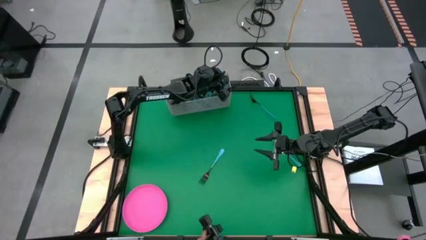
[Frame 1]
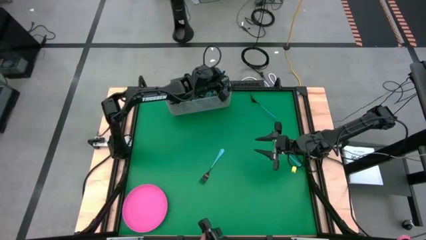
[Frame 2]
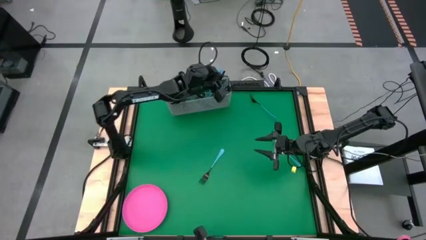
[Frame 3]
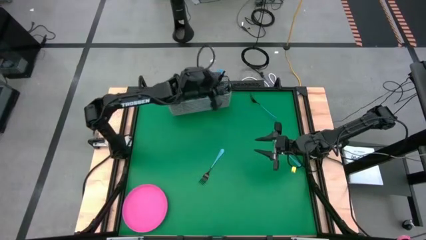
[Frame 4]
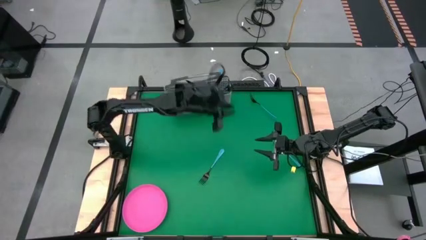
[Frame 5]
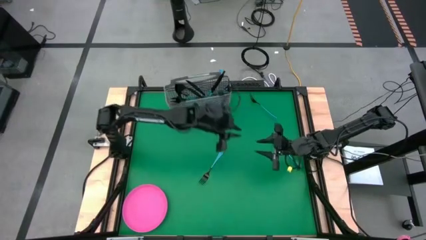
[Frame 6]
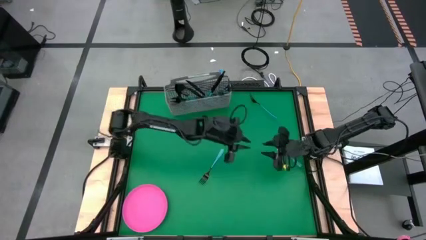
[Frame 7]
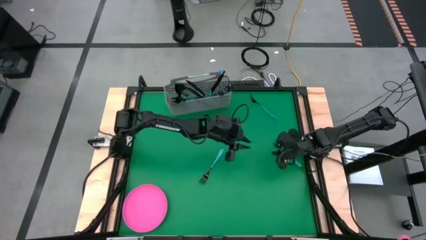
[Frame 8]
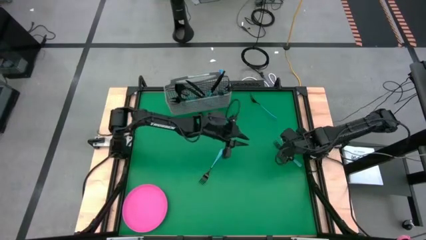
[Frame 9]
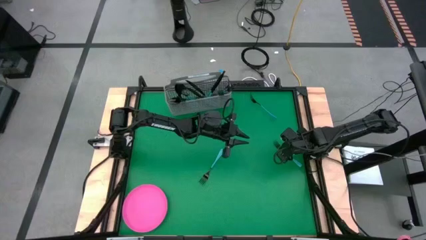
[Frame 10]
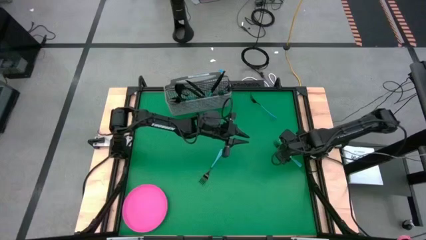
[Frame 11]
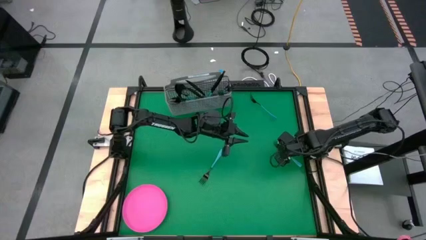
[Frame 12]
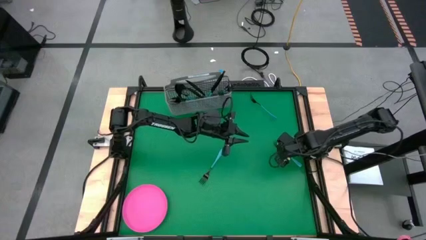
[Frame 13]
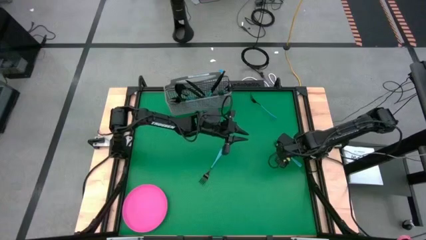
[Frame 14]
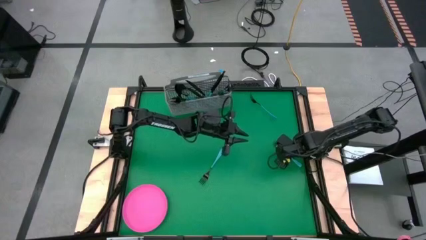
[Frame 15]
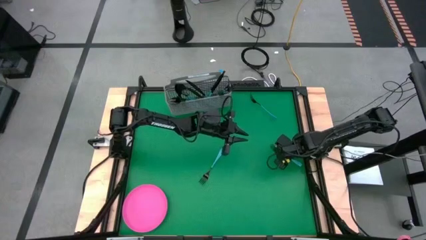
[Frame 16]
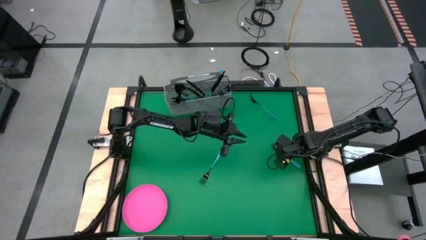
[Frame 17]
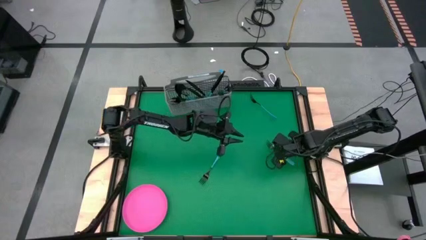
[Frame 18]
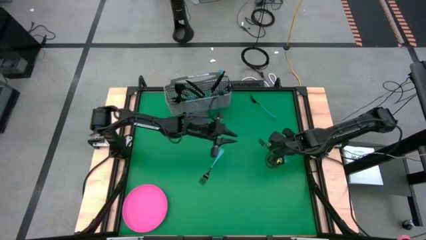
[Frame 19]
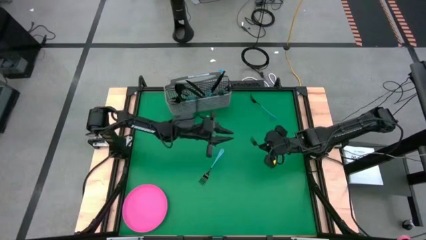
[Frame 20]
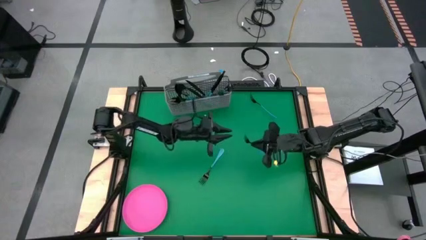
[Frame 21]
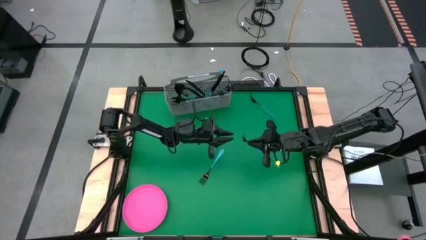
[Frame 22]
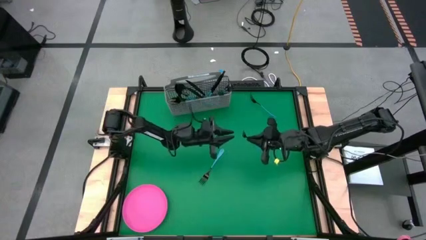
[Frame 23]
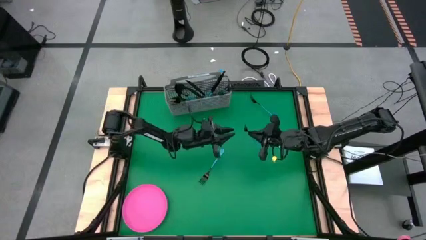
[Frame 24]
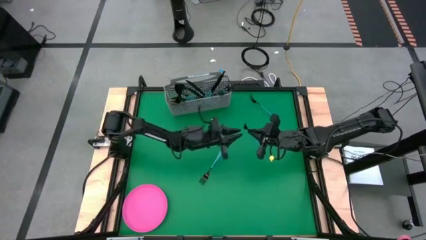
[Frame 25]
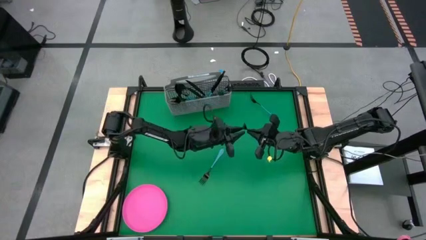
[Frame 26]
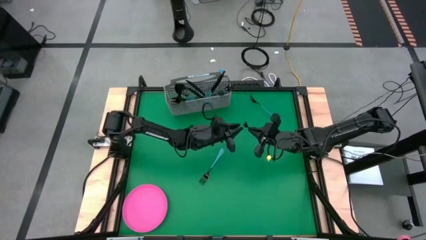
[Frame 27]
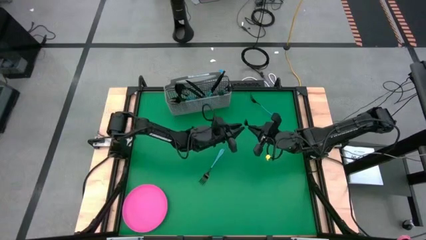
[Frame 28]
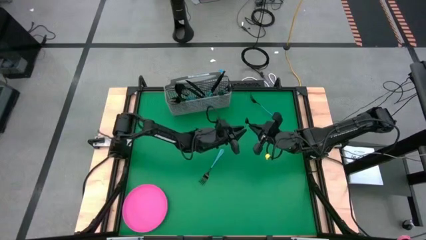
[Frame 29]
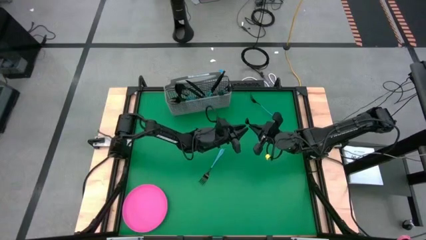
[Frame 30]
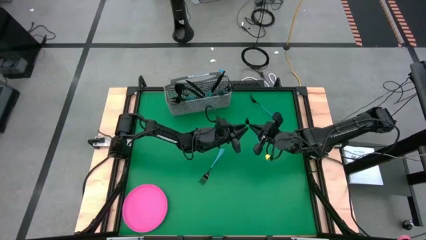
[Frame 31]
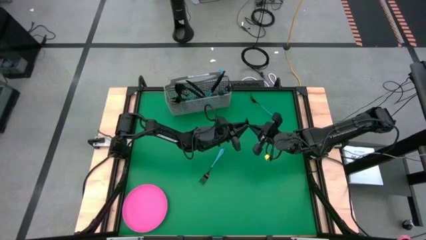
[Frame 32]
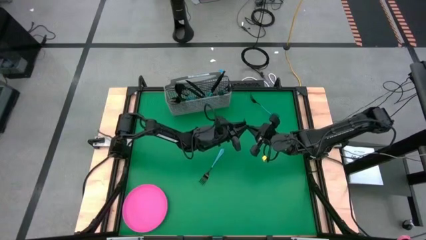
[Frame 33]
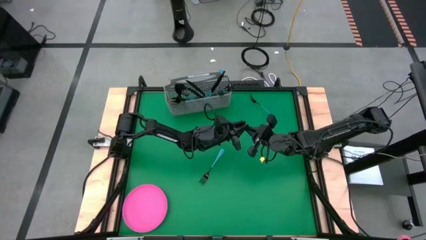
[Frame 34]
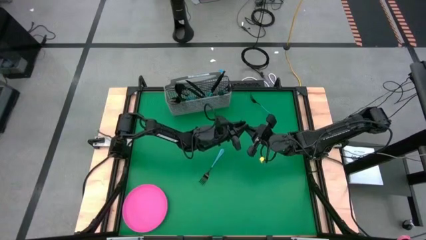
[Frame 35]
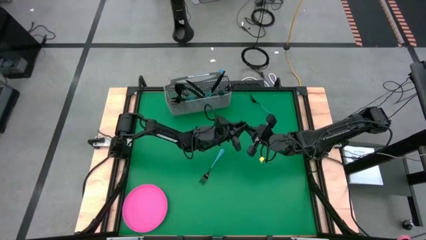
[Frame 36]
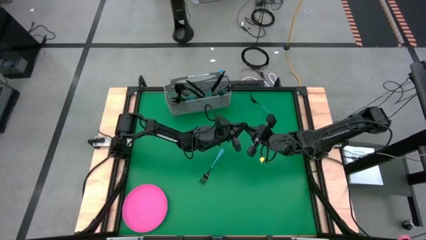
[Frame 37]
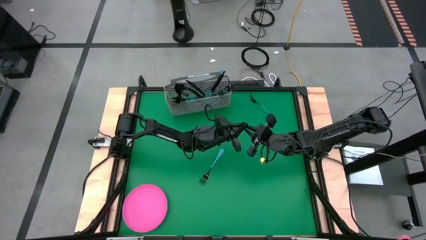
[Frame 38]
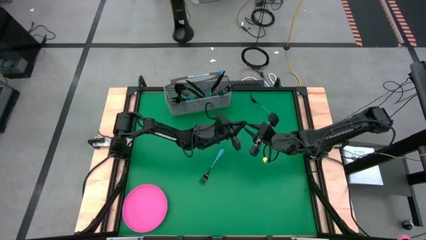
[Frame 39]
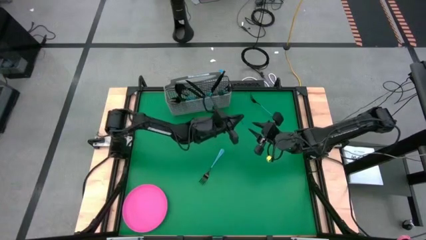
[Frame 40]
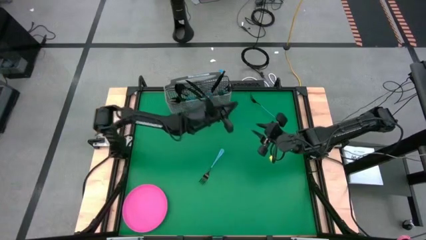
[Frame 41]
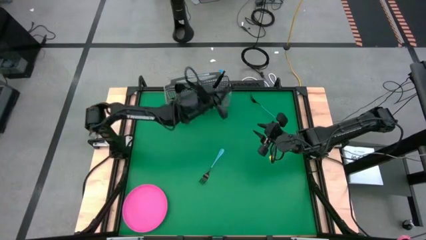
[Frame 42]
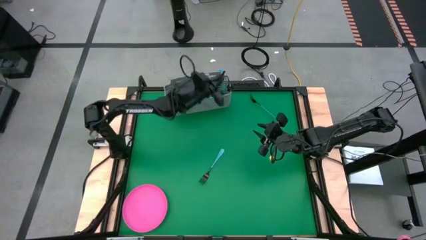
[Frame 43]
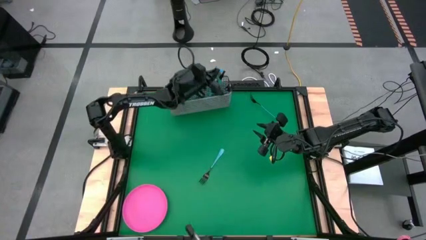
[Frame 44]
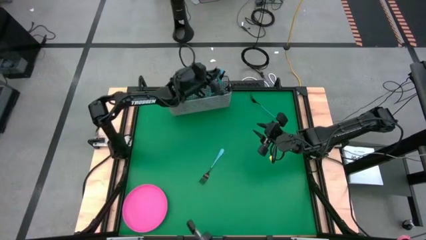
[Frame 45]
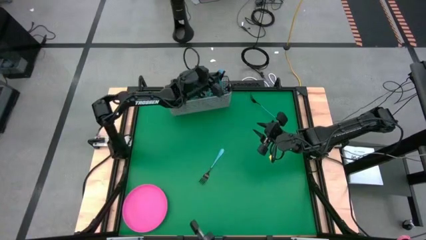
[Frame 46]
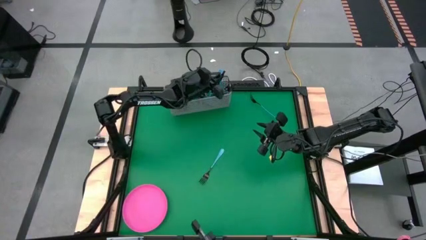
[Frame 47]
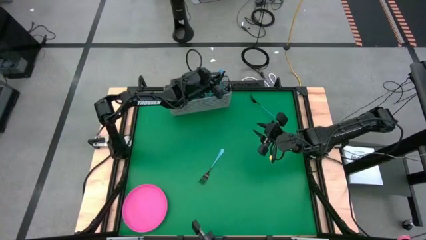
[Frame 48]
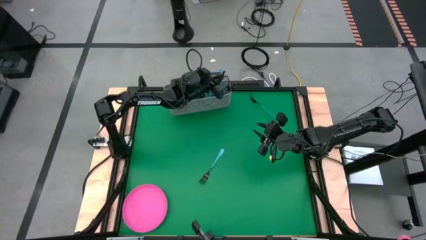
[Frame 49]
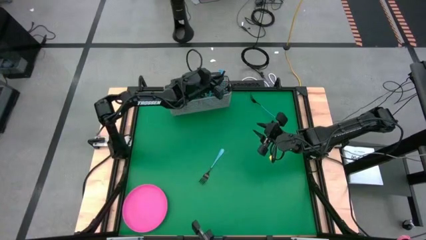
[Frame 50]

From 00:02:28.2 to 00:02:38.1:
Task: Sort silverware
Put the blue fork into the silverware basket

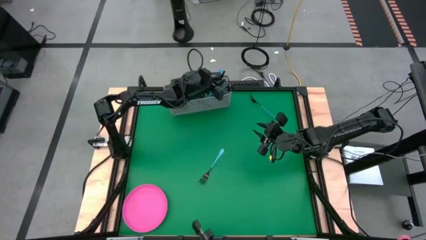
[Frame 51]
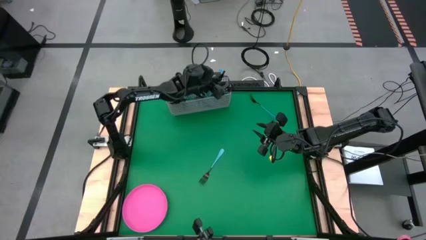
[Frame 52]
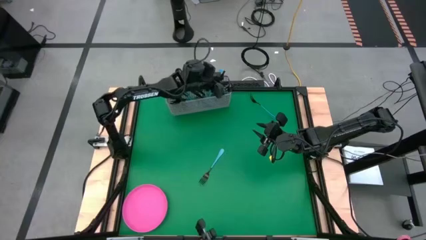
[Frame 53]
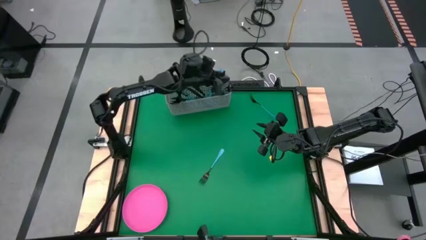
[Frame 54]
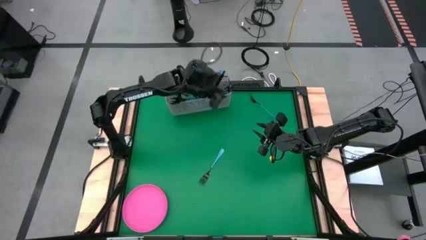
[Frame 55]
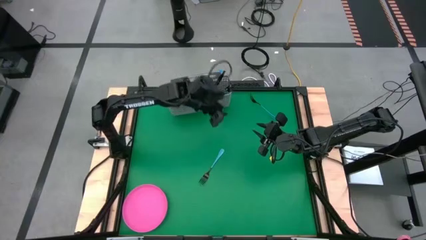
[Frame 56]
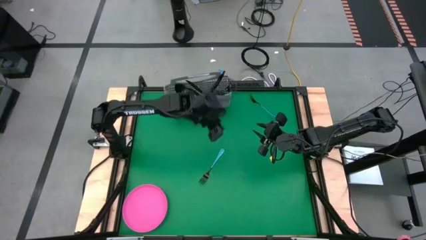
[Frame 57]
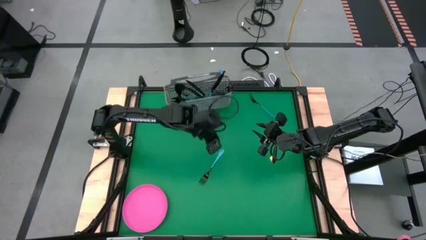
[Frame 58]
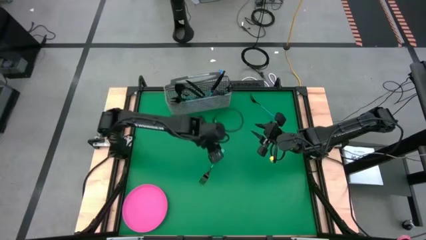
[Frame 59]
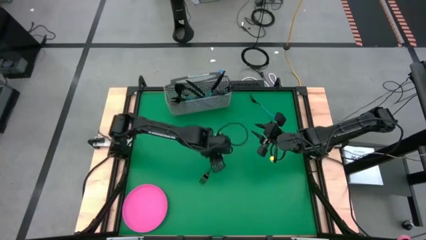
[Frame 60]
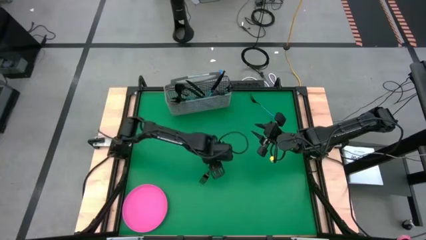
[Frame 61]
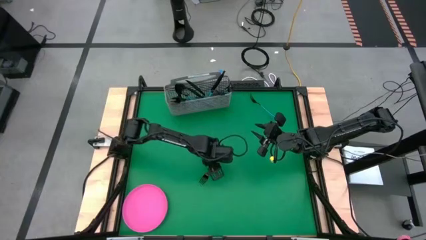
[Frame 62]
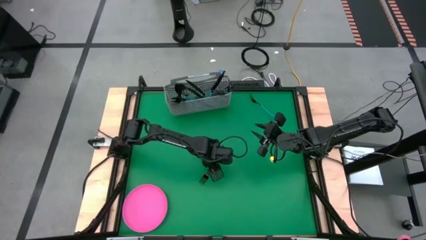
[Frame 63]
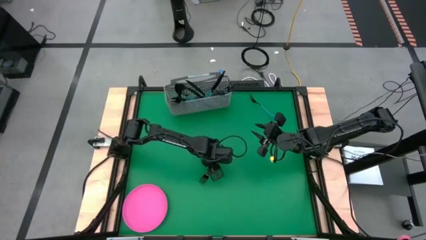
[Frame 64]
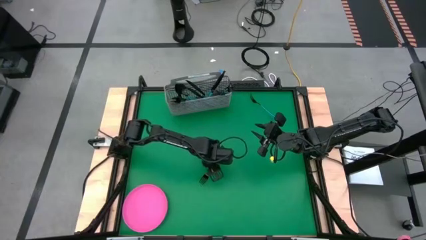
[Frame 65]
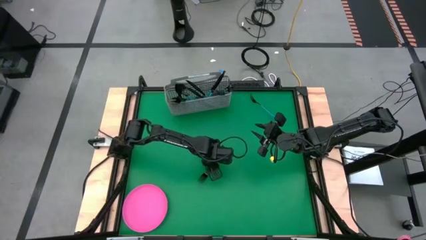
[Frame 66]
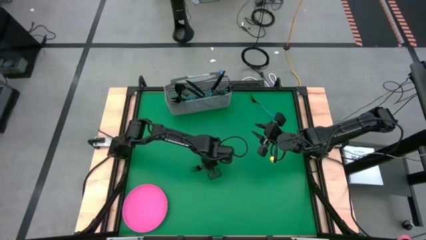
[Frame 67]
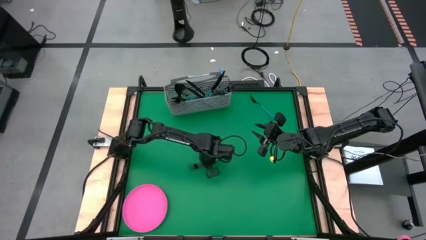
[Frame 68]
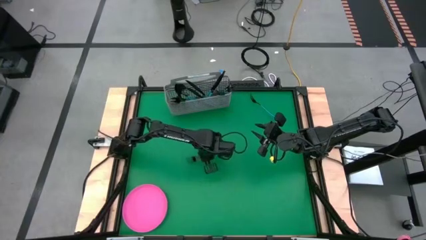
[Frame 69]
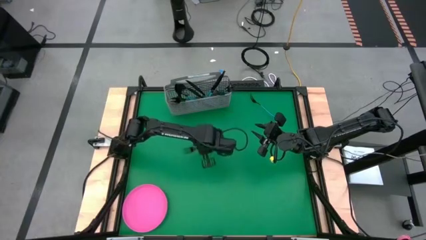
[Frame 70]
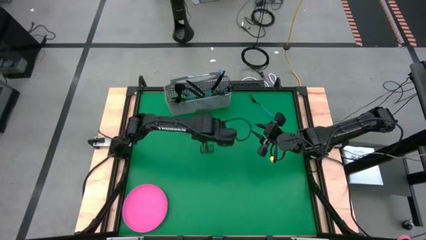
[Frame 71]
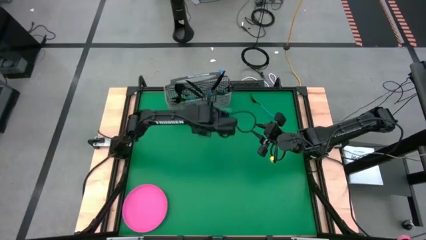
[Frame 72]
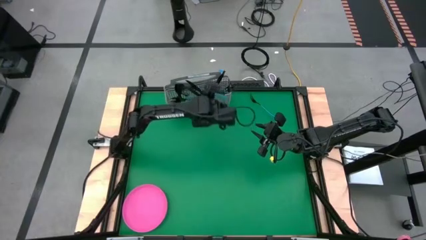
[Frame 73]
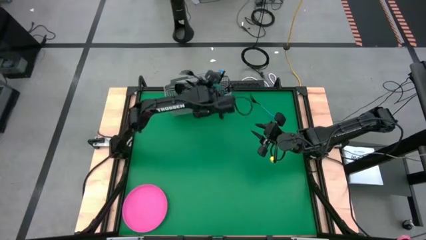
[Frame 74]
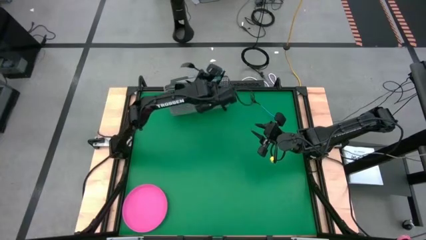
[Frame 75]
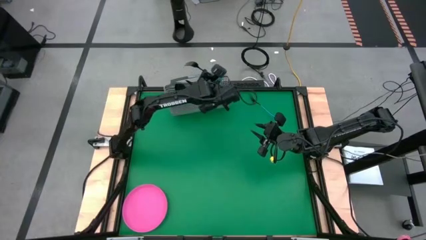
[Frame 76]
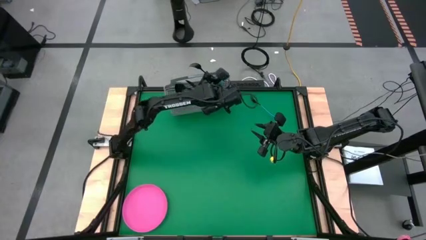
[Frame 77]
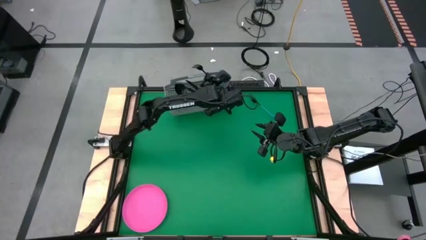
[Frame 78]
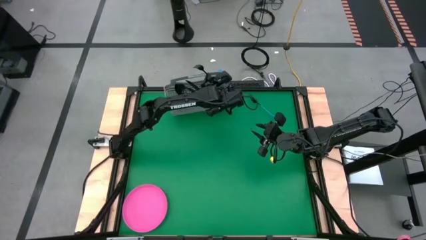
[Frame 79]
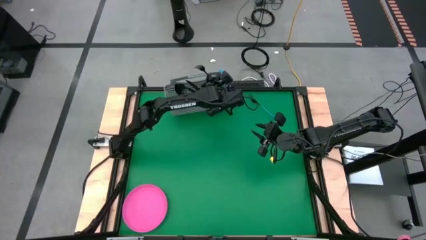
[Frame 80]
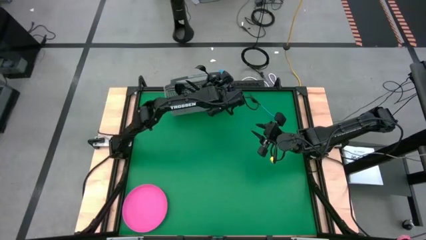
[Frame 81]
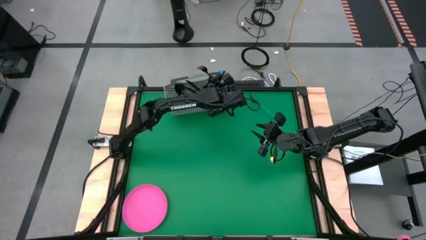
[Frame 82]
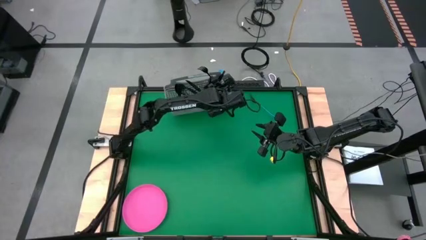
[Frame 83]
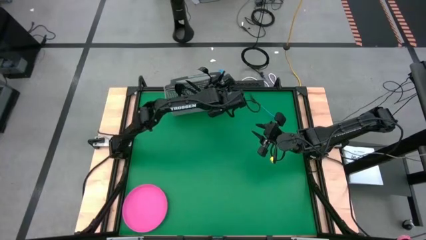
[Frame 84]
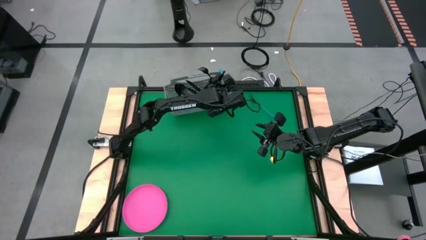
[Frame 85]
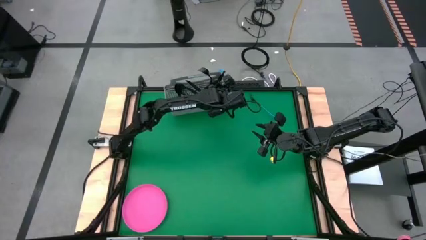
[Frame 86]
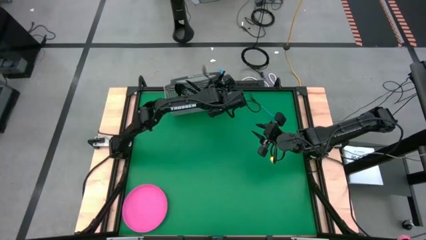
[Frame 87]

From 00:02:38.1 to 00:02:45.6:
Put the blue fork into the silverware basket
